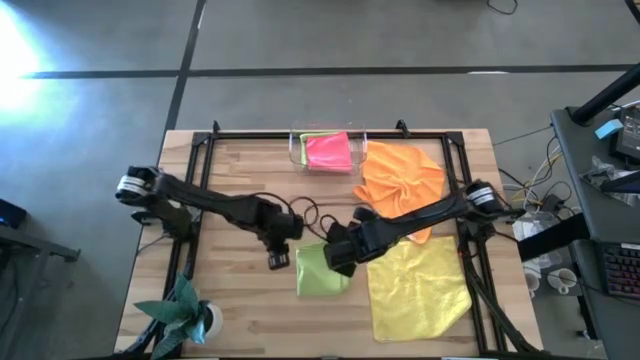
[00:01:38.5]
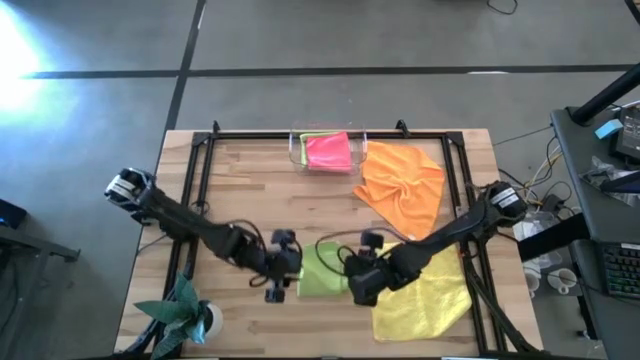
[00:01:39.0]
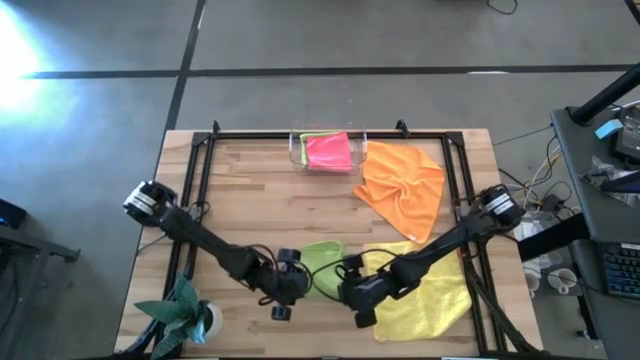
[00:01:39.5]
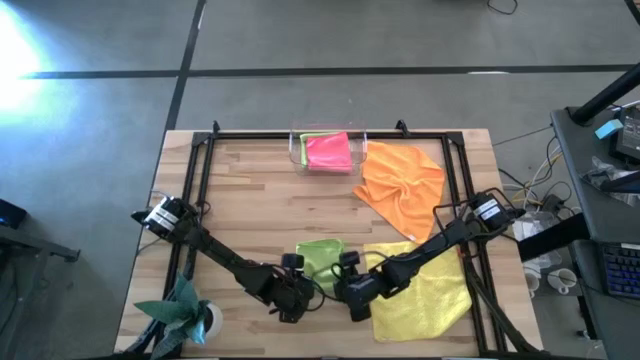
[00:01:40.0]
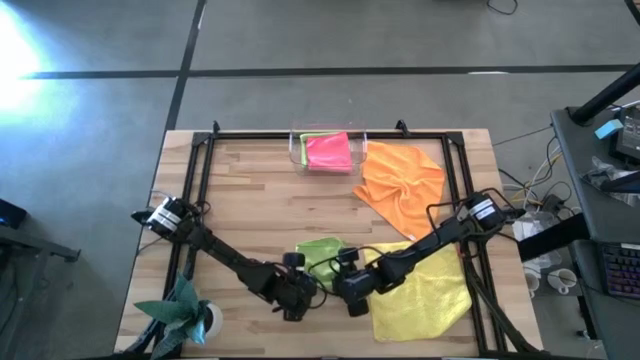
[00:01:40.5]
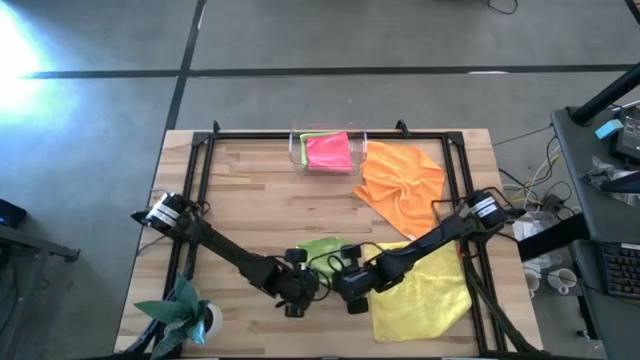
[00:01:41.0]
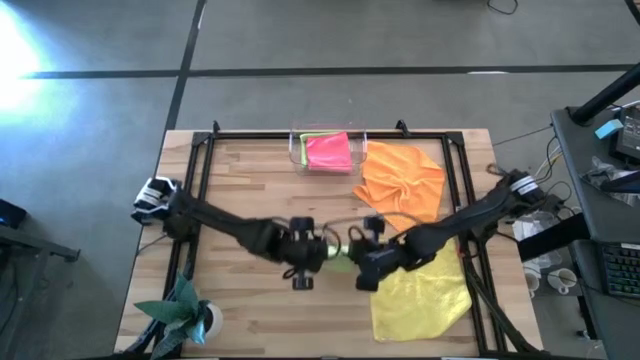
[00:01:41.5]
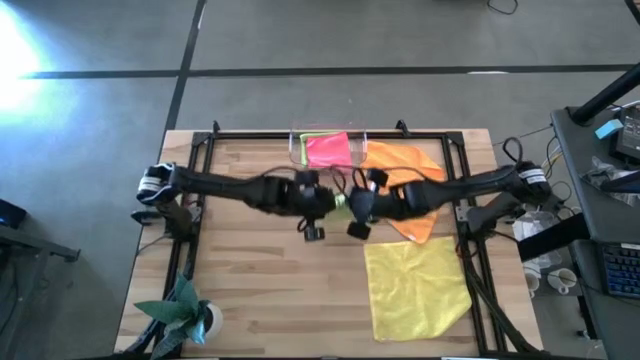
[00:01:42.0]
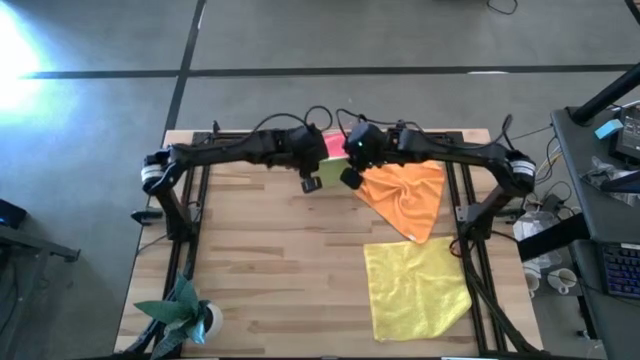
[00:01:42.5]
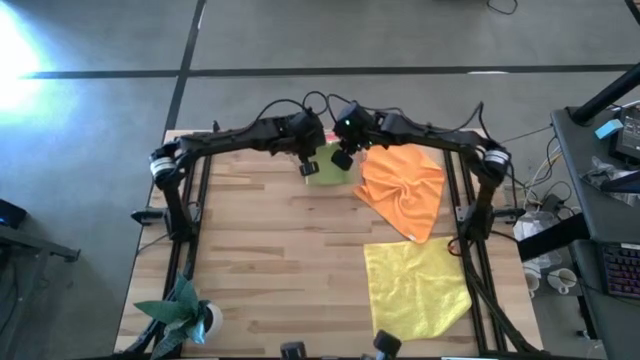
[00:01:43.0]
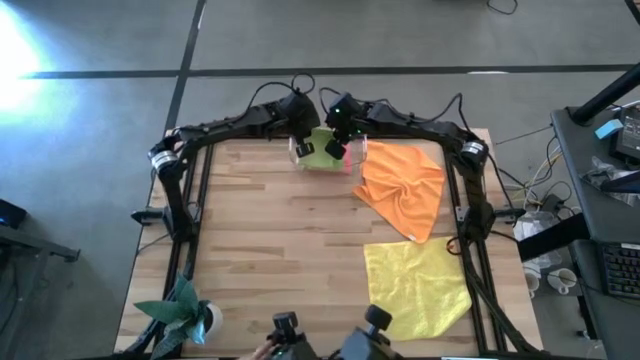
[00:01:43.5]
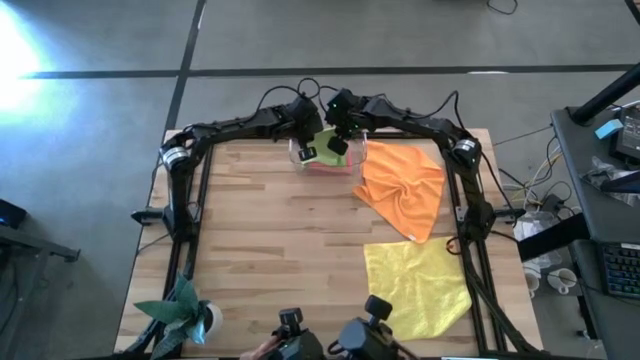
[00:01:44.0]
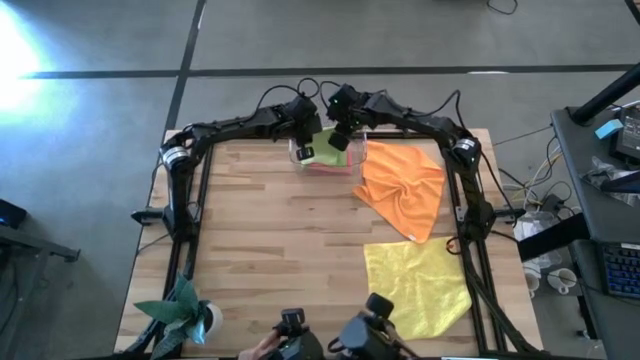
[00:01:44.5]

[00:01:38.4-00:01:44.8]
Task: Fold microfiber towels
Put the green microfiber towel into the transparent bin

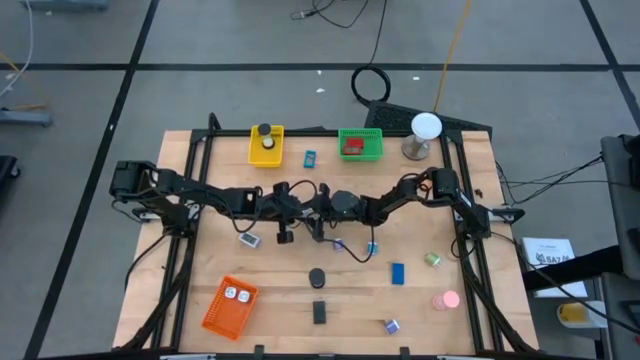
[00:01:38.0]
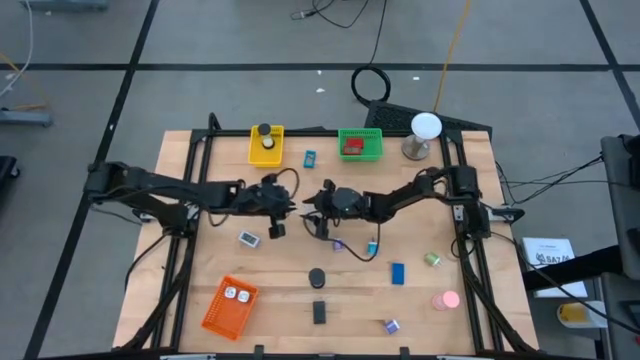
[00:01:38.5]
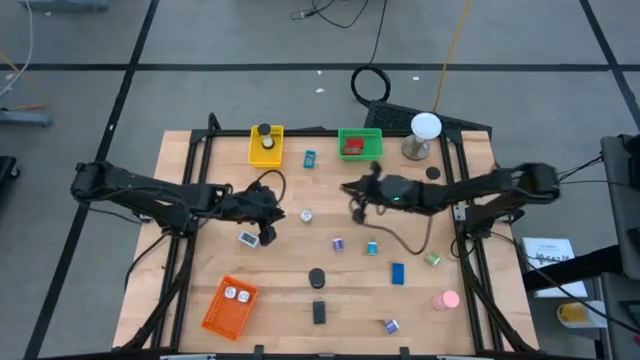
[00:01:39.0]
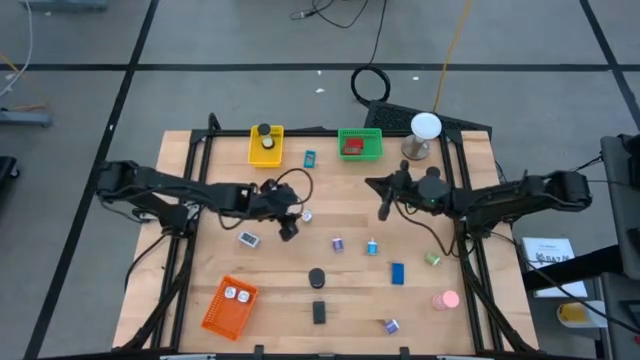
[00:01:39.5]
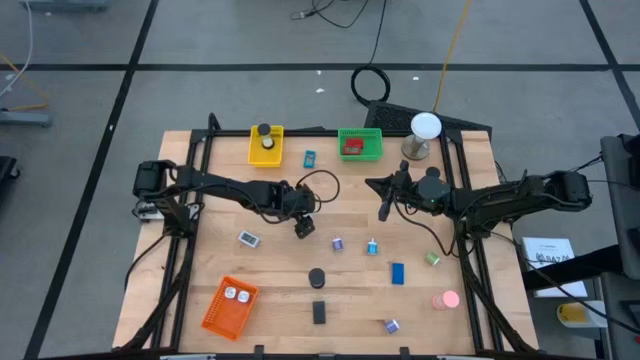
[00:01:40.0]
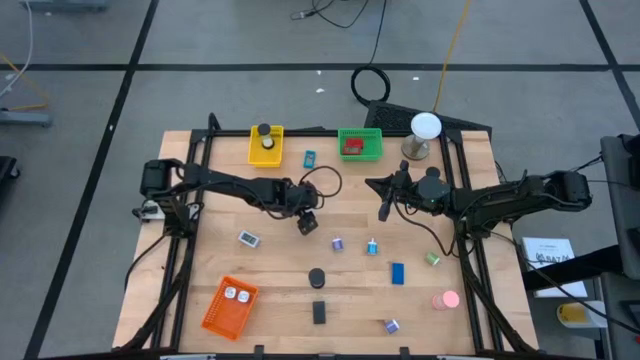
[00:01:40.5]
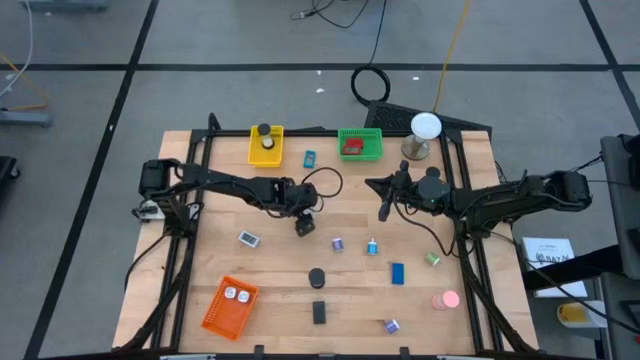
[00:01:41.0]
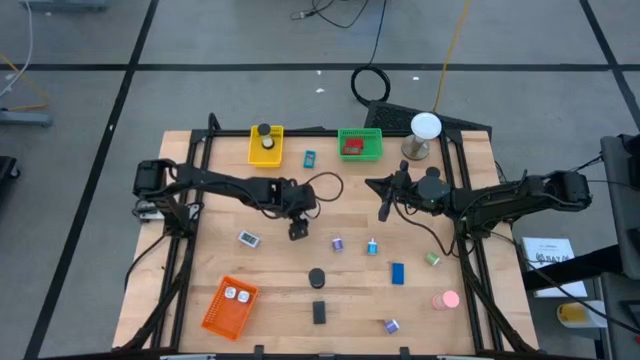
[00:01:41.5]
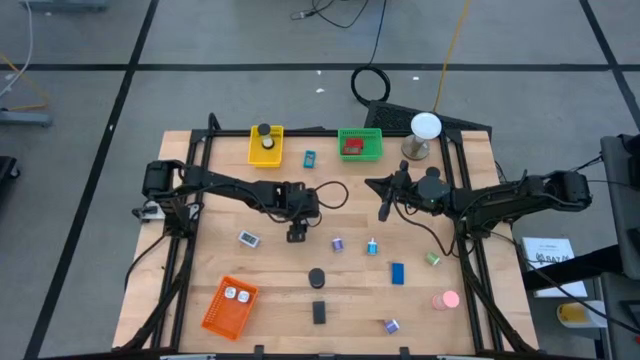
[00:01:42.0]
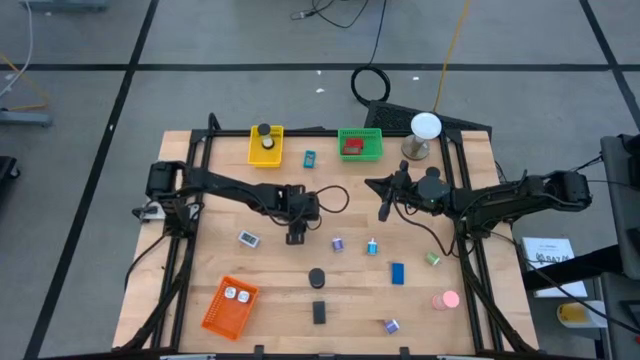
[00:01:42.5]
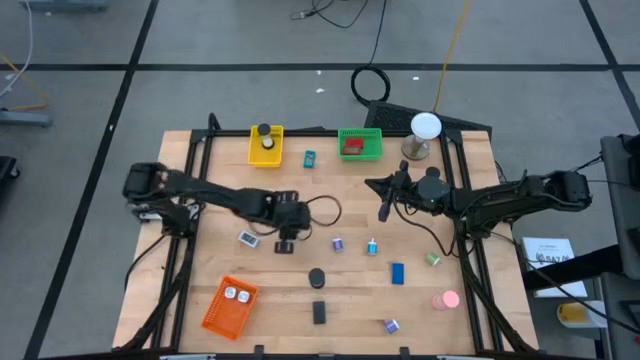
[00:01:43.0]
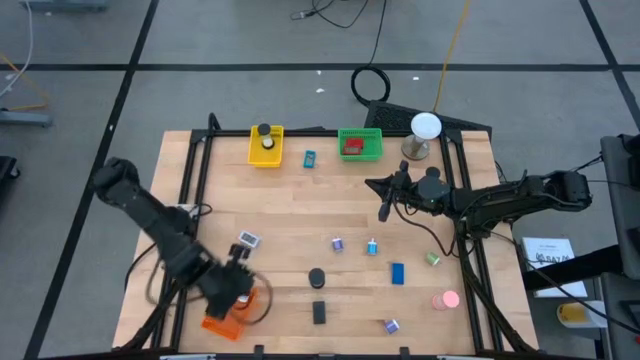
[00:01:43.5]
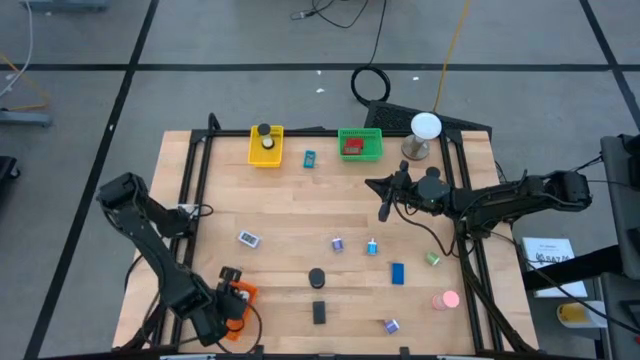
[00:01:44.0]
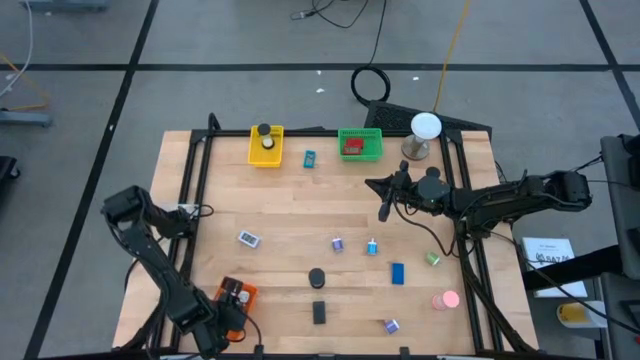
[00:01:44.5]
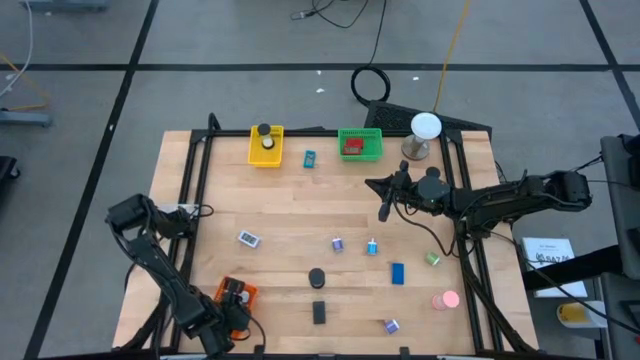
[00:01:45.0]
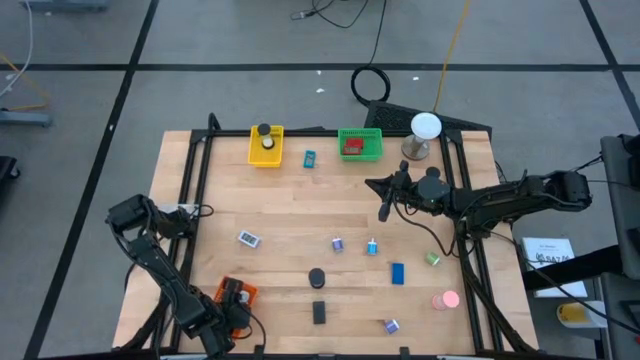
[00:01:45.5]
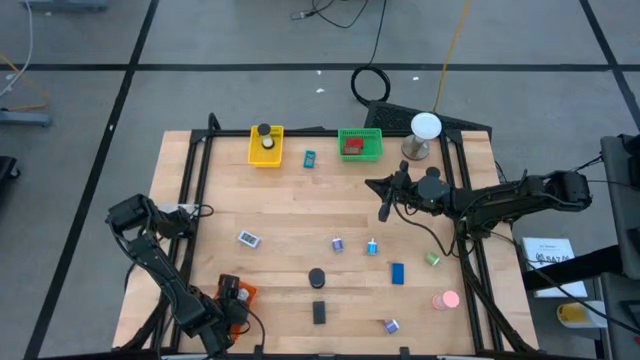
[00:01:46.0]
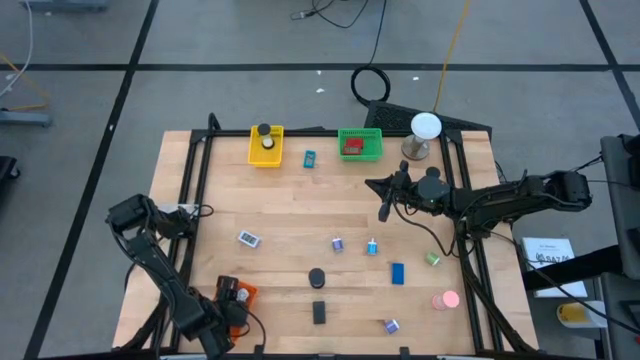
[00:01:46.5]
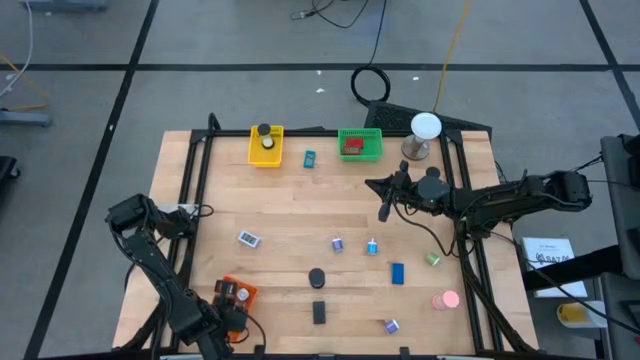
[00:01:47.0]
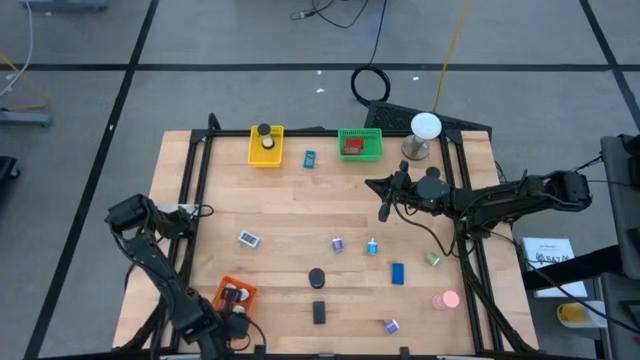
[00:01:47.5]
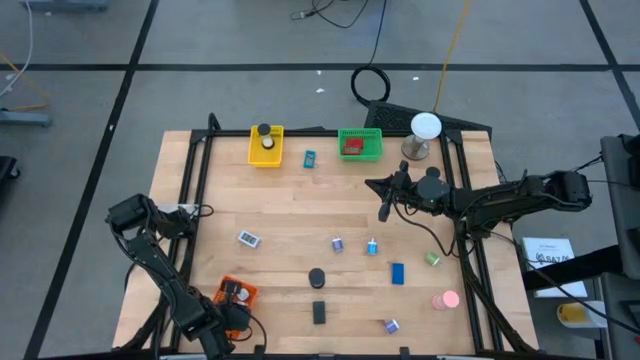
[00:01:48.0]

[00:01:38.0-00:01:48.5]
Task: Pick & Place Office items
Put the left green charger adapter into the orange bin

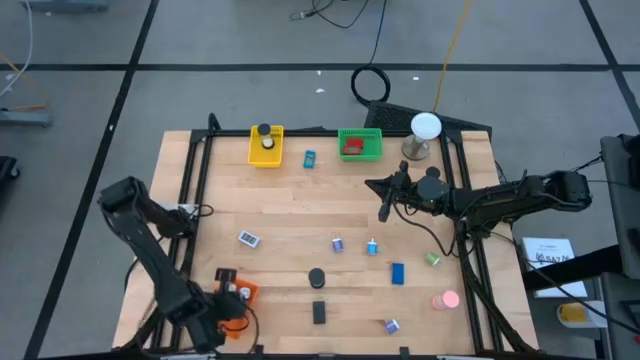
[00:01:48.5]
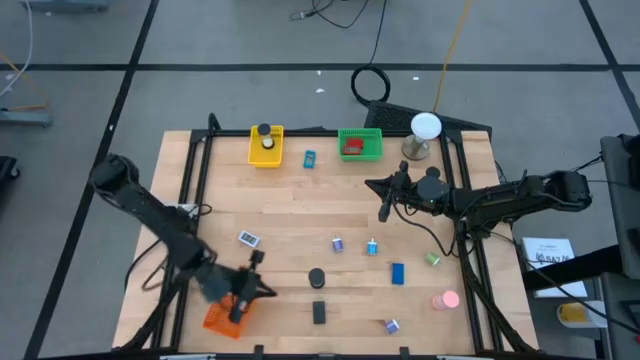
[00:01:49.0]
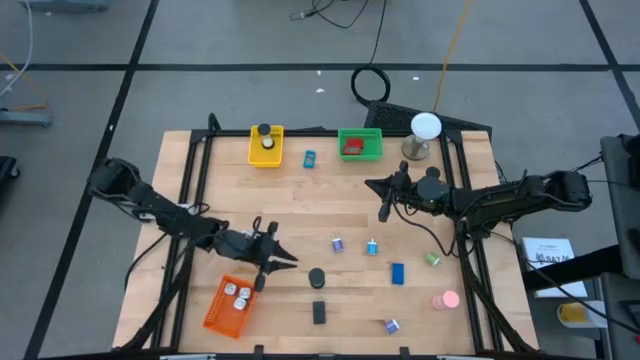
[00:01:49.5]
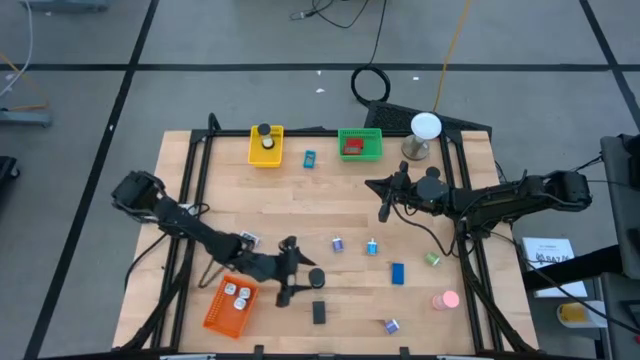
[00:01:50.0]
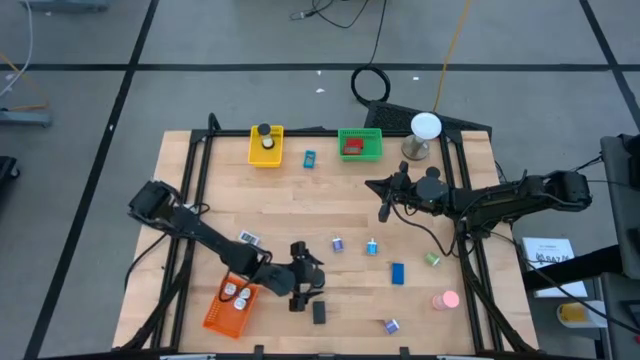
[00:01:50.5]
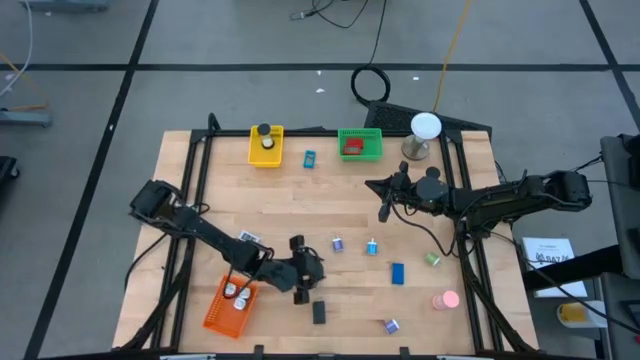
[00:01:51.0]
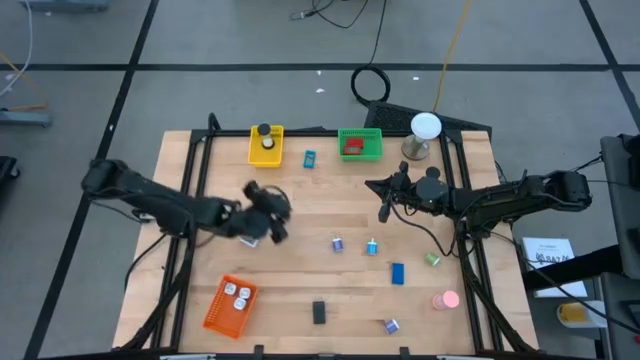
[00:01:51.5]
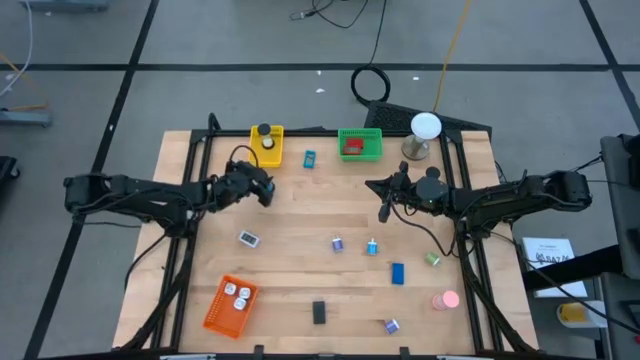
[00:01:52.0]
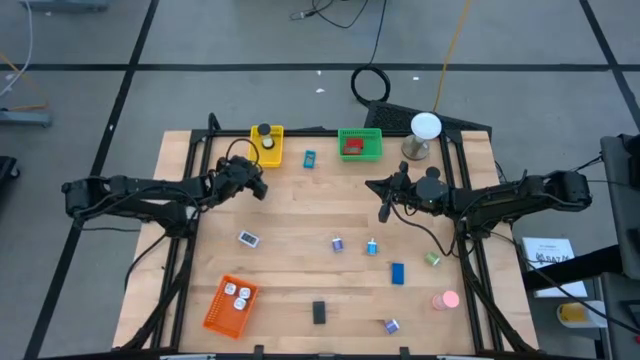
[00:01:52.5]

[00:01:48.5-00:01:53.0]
Move the blue hourglass to the top left of the table
